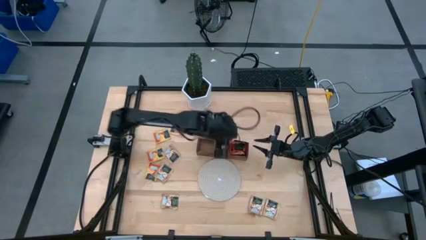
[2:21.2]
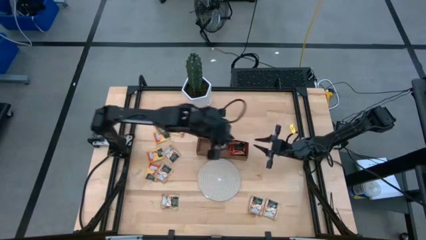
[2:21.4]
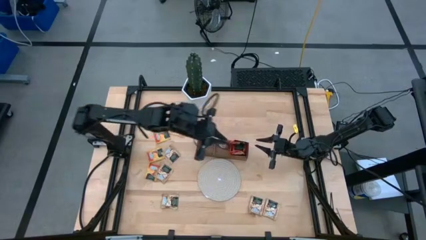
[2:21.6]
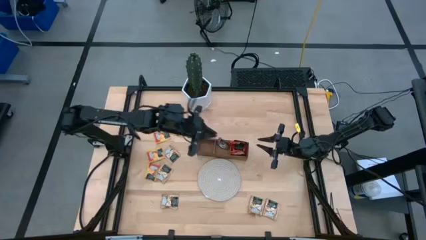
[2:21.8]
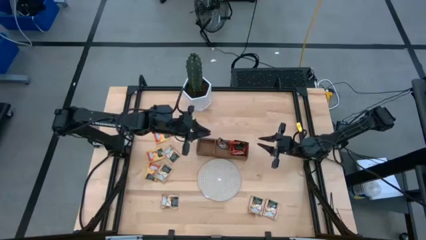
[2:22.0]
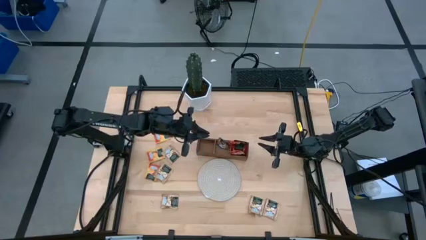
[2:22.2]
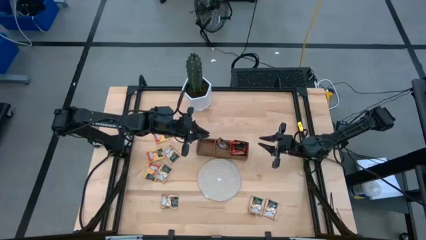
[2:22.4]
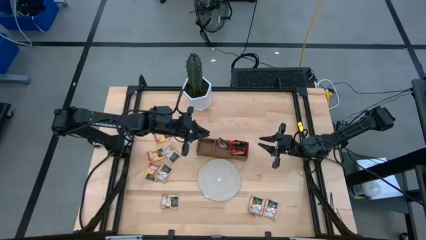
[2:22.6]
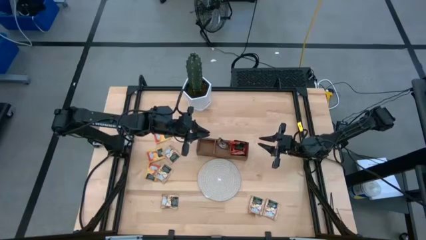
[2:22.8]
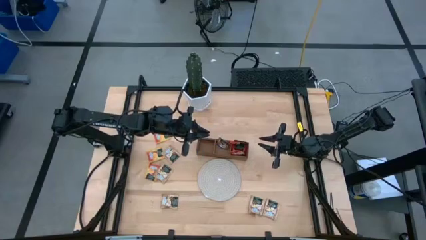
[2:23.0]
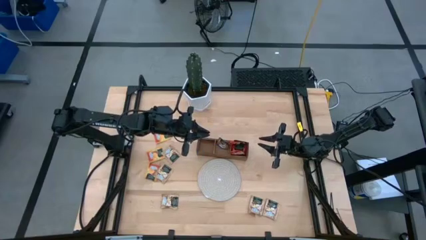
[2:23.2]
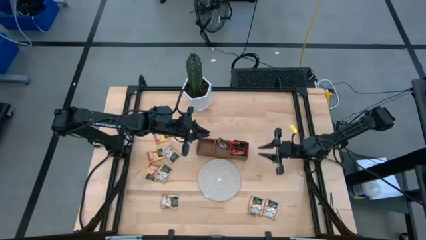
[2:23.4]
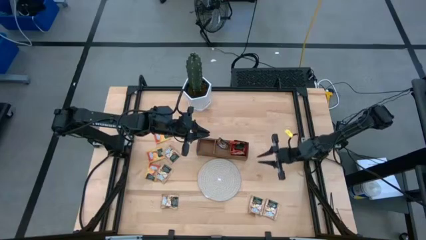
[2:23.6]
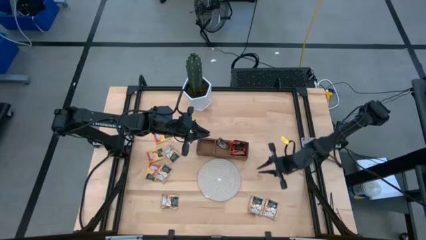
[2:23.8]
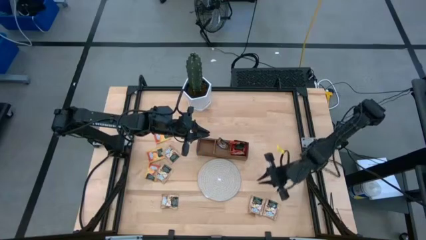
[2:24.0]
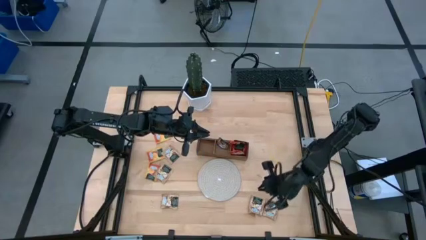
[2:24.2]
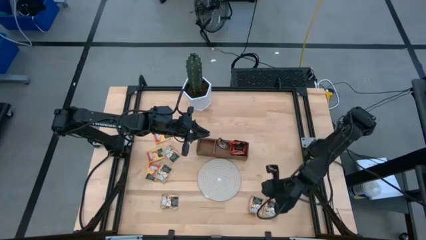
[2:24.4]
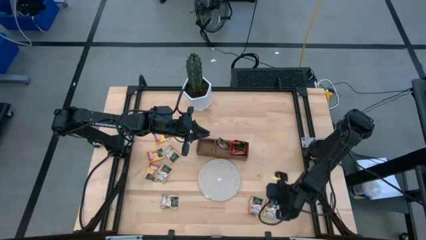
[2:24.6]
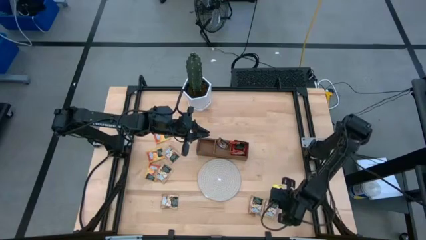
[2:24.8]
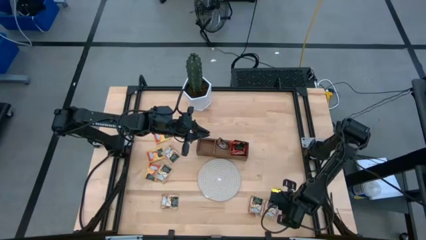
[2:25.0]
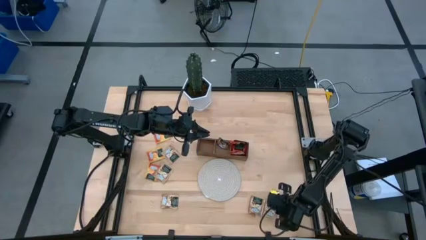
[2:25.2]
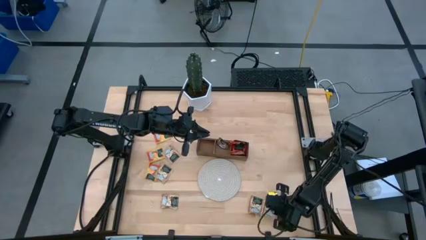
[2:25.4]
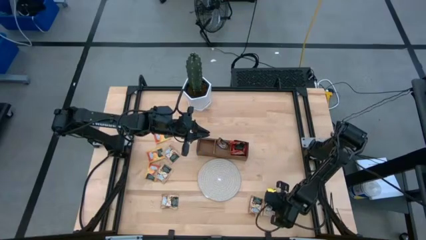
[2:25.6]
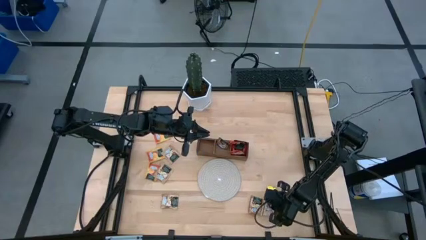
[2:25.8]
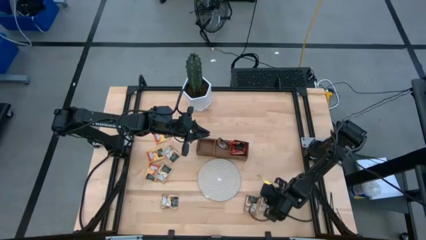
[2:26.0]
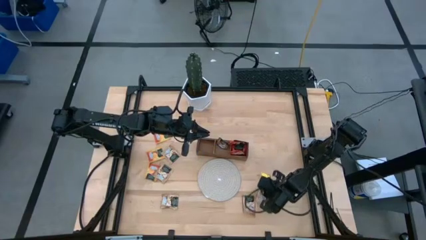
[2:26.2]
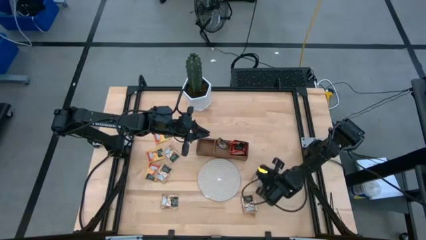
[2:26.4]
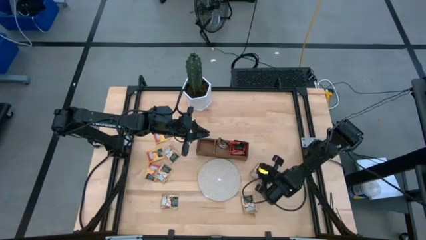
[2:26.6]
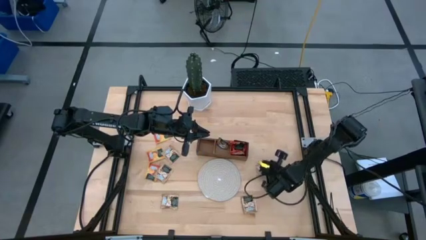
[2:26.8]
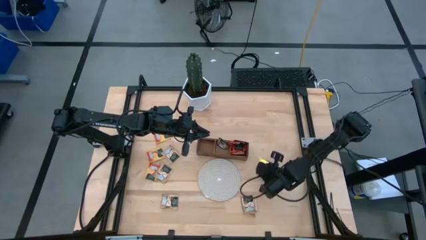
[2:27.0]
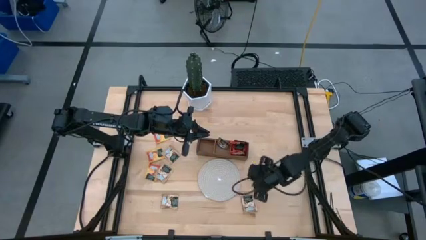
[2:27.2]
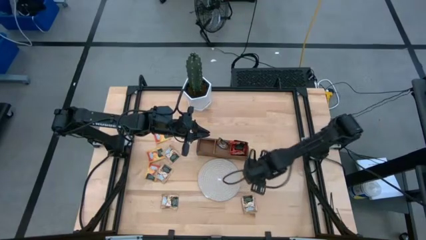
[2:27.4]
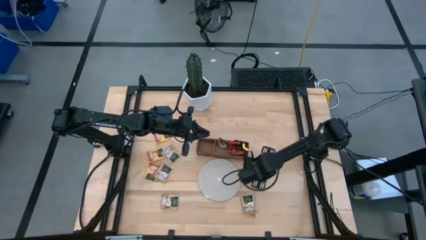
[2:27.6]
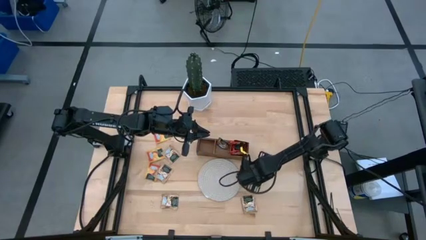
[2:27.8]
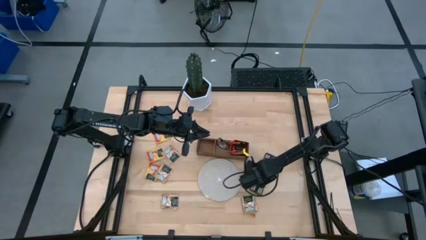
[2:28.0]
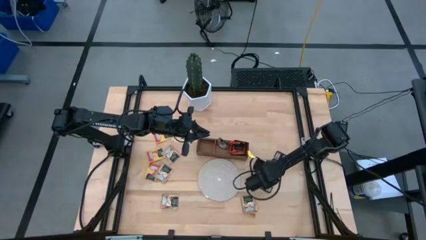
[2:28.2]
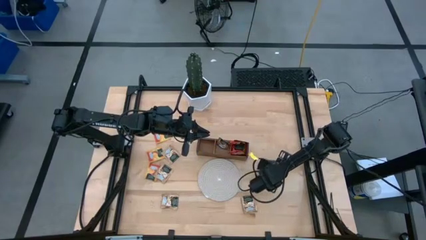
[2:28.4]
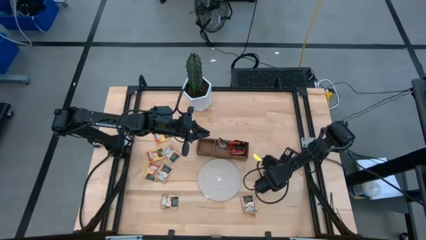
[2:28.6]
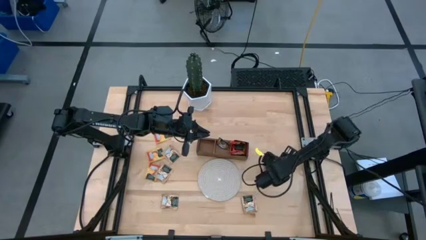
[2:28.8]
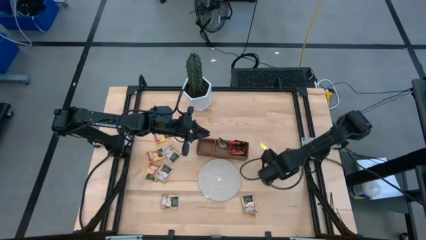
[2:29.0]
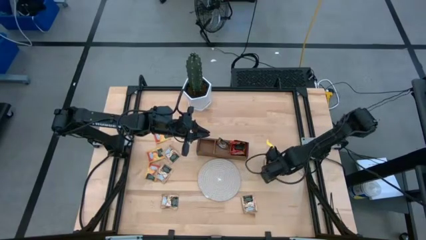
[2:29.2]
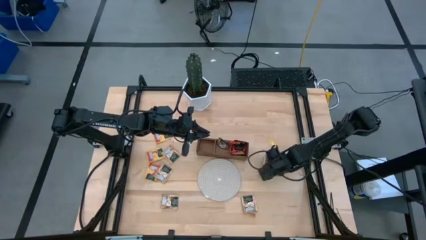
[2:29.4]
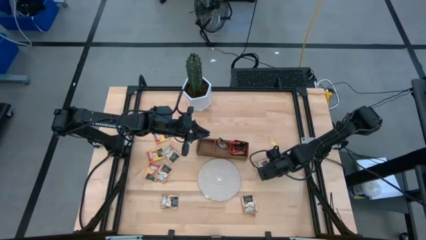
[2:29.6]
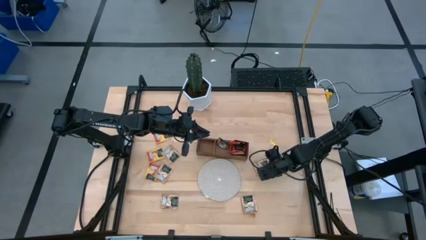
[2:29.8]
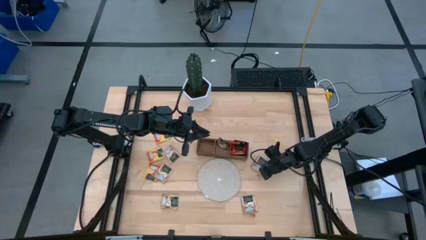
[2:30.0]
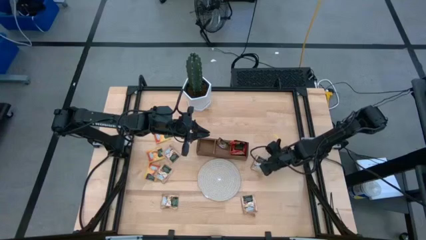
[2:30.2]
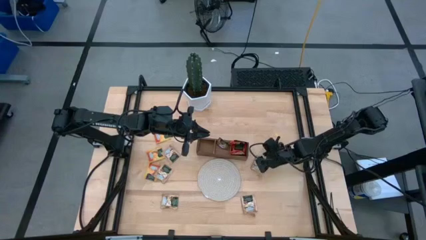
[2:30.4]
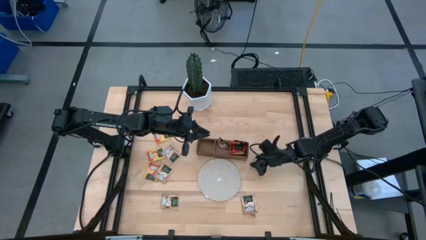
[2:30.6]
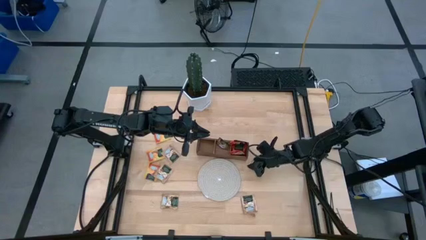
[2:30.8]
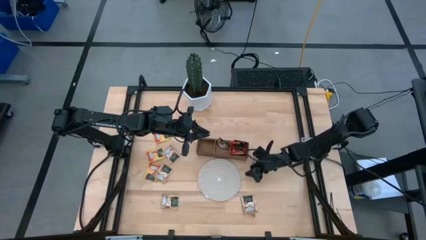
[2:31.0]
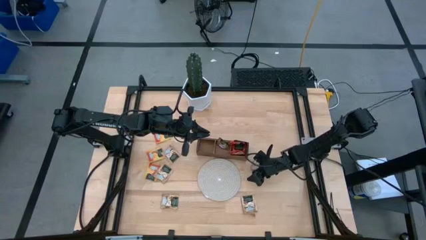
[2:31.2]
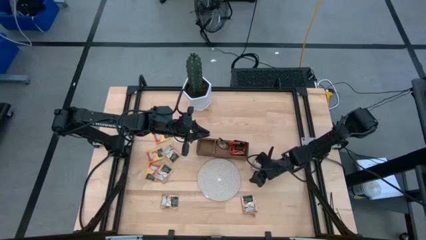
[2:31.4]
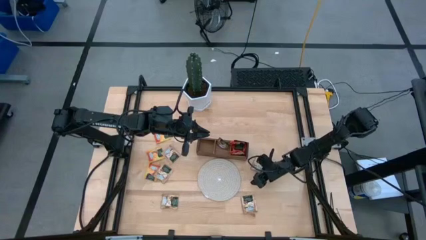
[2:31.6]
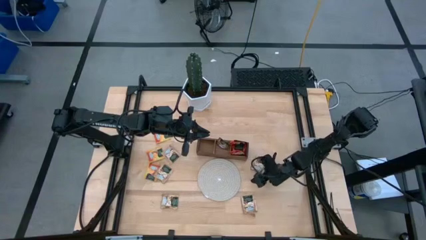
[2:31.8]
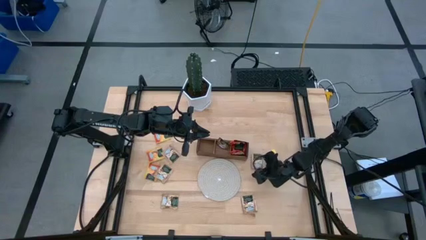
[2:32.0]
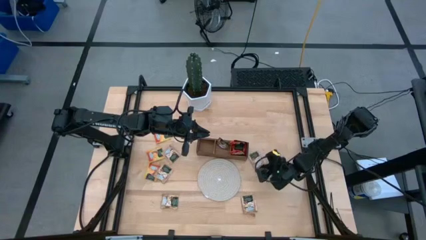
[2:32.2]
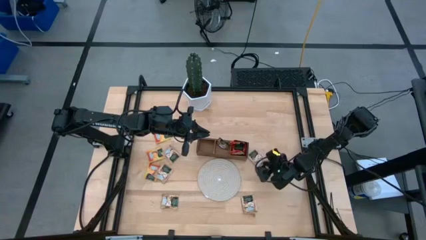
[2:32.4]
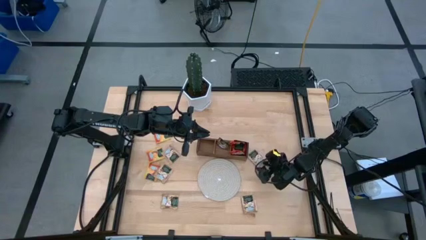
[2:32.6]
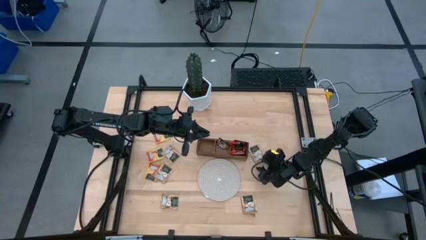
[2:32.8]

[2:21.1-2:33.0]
Task: Pick & Place Tea
Put the brown tea bag into the middle section of the wooden organizer

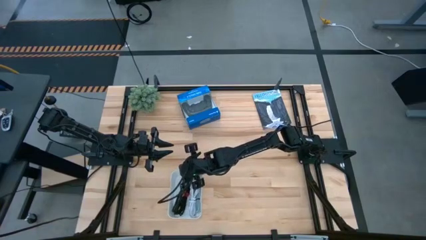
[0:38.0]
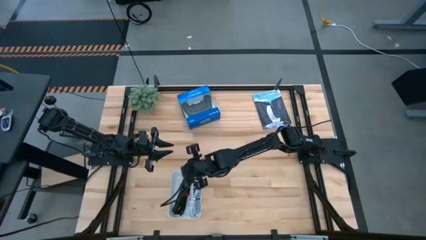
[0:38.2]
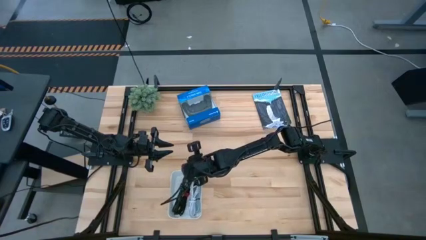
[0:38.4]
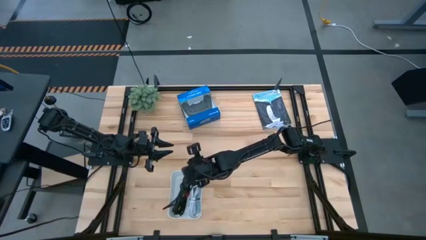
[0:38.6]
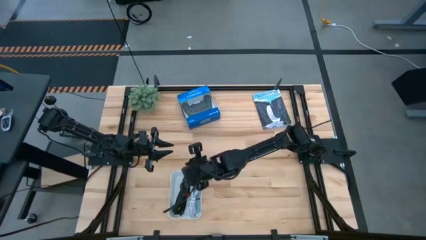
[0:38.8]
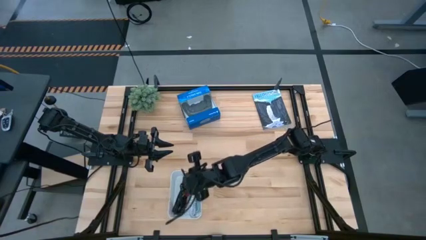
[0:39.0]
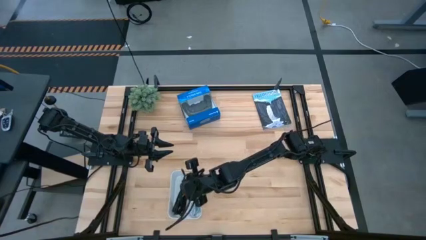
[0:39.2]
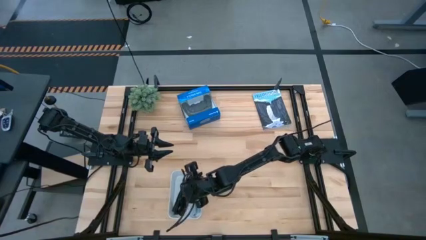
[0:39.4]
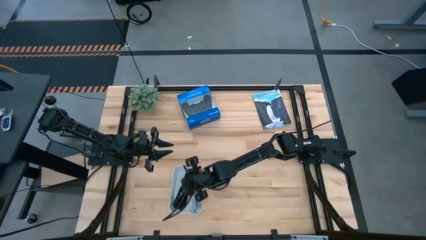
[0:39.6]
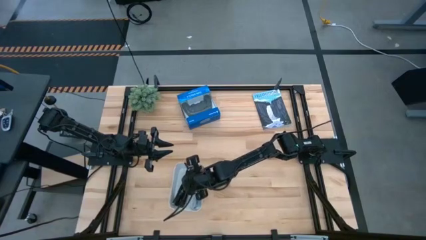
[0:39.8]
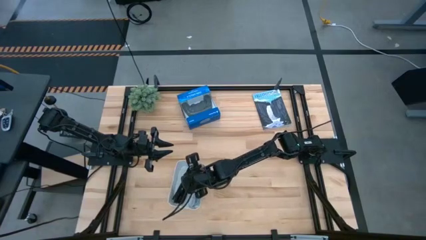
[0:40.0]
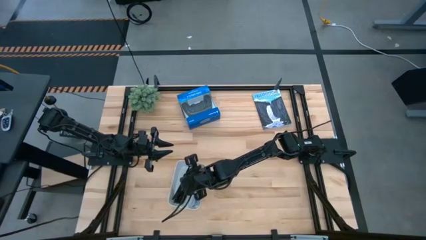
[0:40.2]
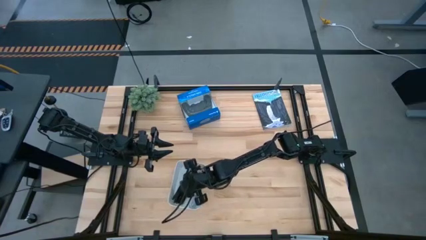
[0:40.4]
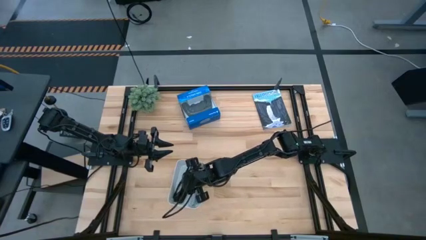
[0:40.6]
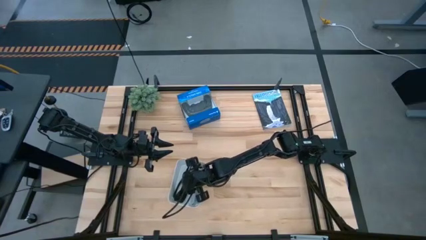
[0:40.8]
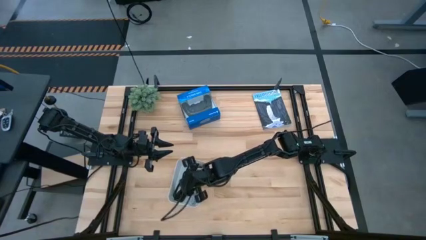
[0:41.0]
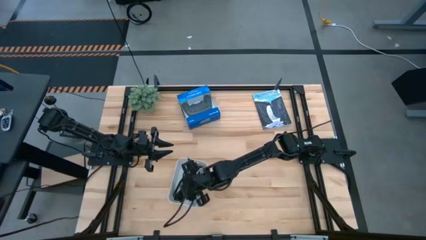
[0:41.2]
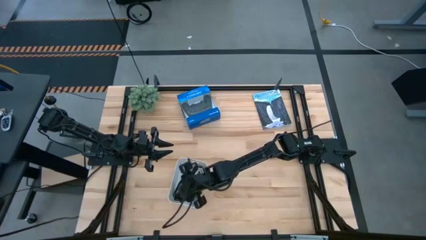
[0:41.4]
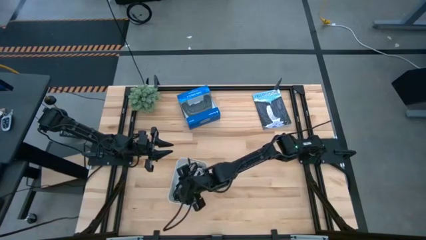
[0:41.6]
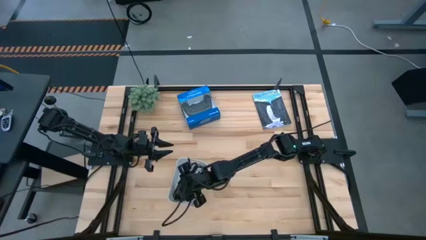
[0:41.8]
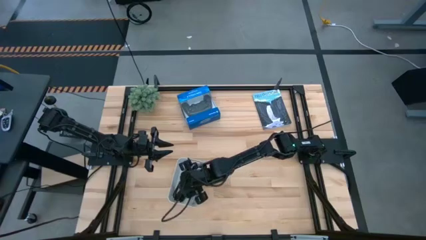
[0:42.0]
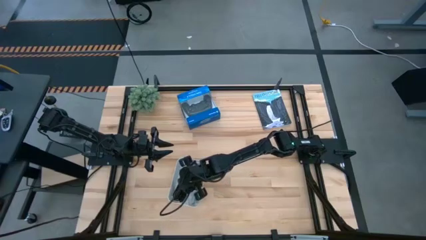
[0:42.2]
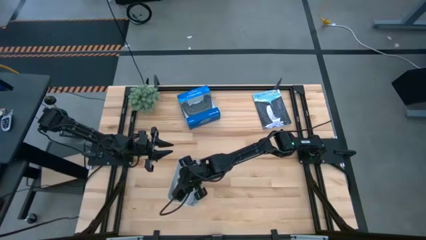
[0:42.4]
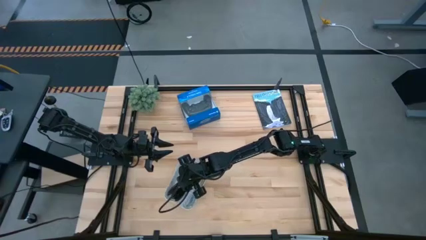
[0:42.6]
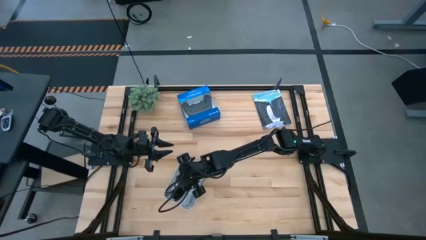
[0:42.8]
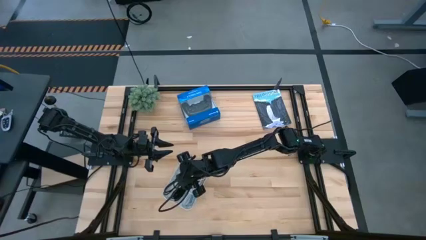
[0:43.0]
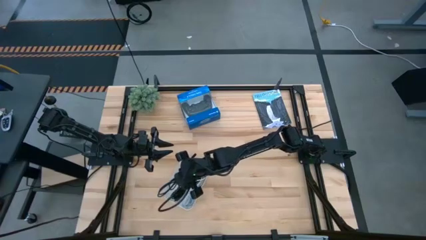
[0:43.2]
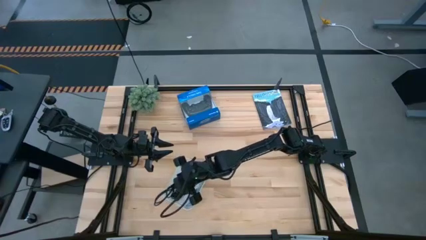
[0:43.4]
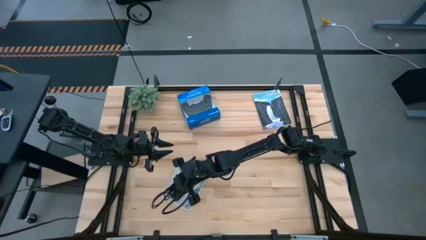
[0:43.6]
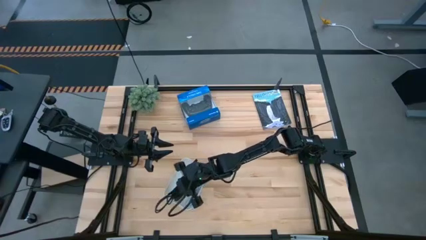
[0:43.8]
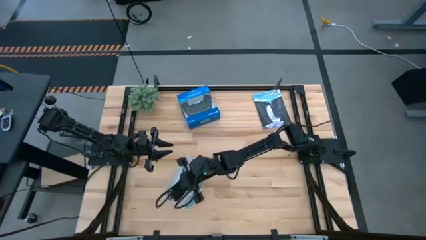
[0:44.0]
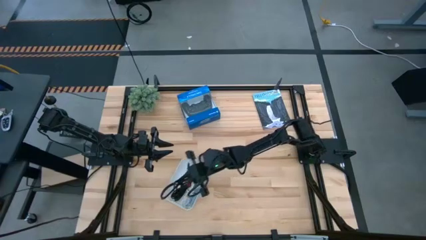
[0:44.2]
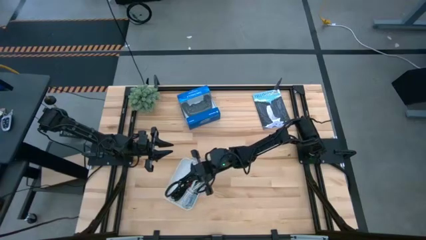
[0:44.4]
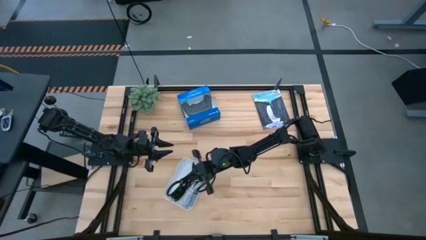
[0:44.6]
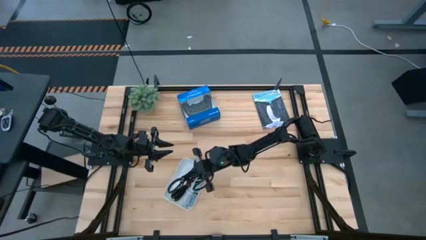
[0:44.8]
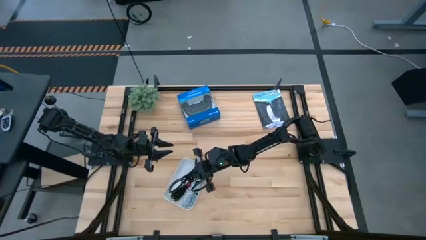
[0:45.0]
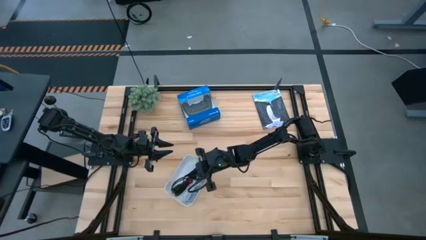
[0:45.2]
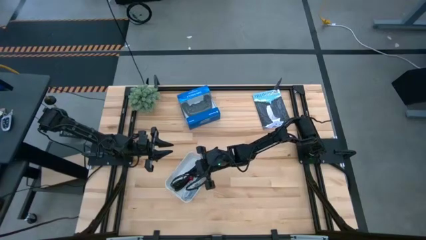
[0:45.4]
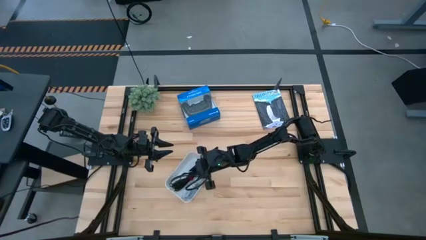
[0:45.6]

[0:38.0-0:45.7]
Task: Pick and place USB-C Cables
Adjust the black charger cable in the white bin
